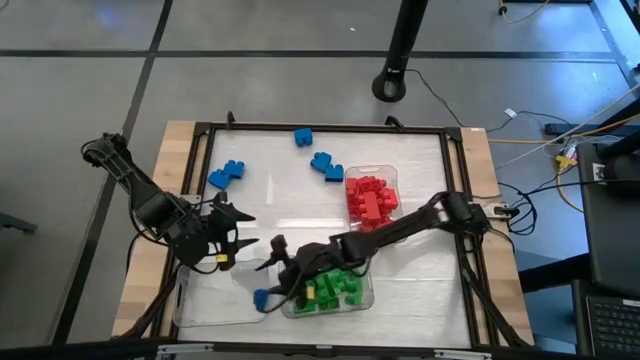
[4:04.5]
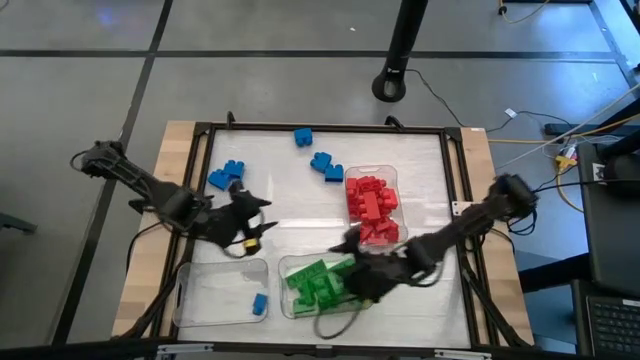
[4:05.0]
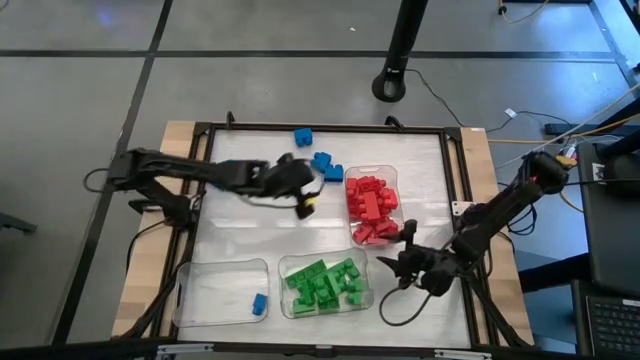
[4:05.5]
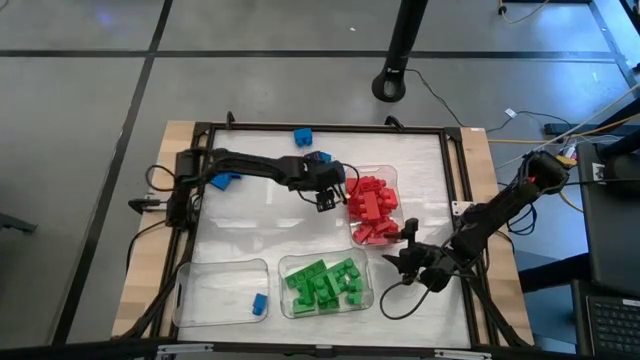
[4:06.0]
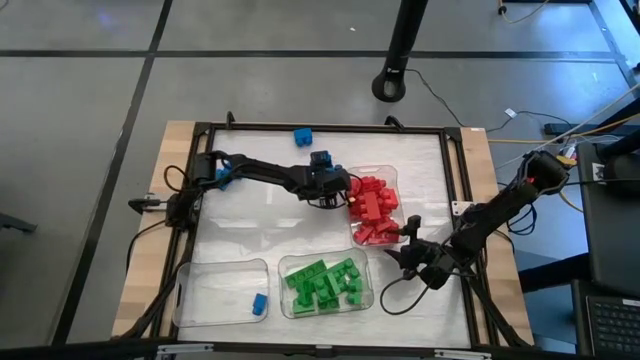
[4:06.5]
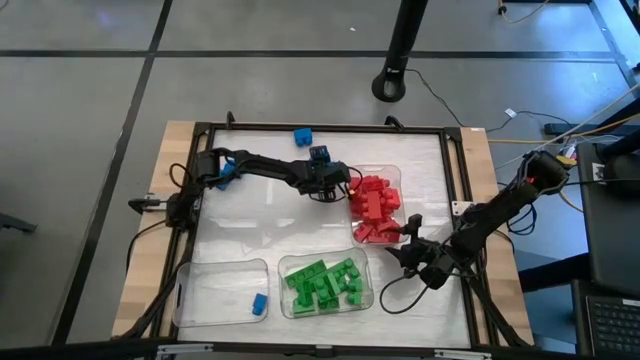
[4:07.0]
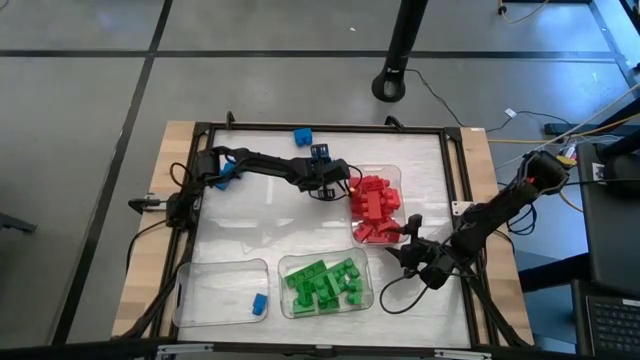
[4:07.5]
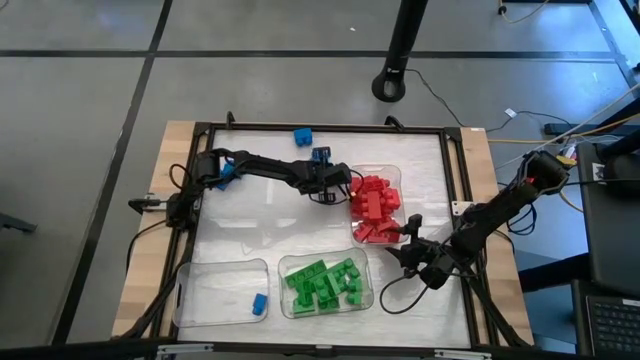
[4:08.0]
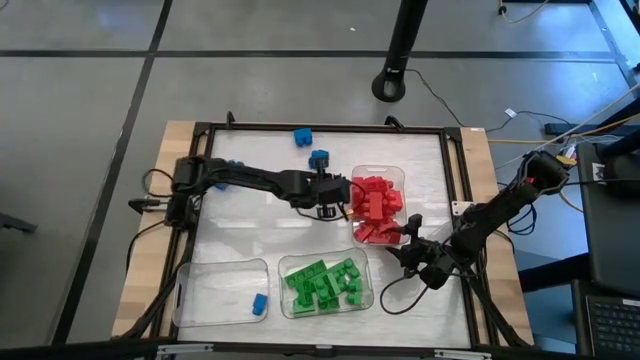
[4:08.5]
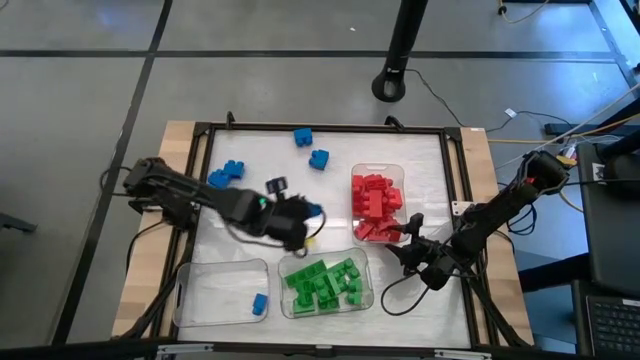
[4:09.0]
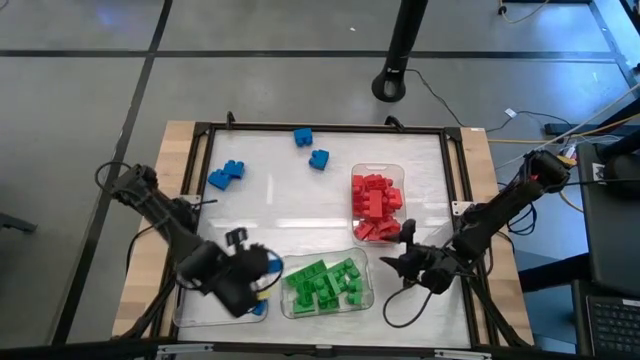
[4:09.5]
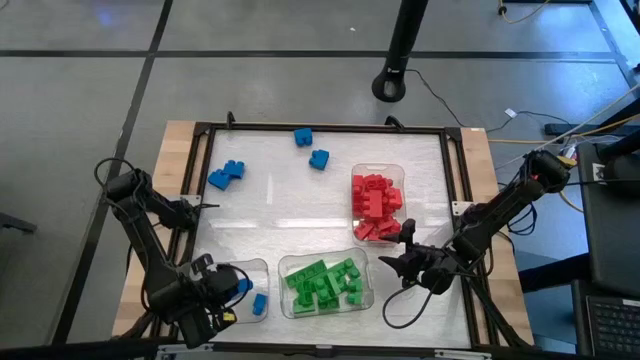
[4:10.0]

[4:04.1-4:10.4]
Task: Sort blocks
Put the blue game piece into the bottom left transparent bin

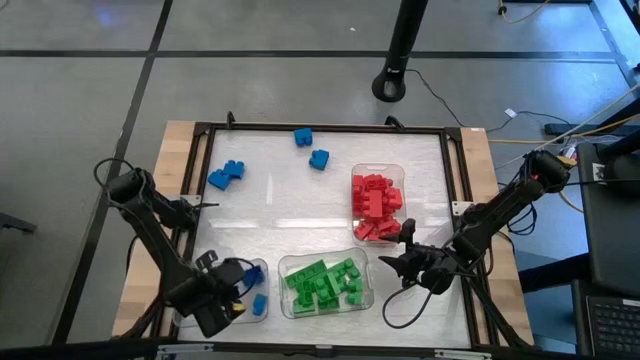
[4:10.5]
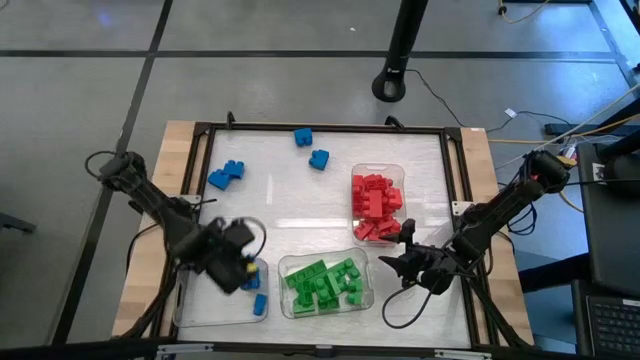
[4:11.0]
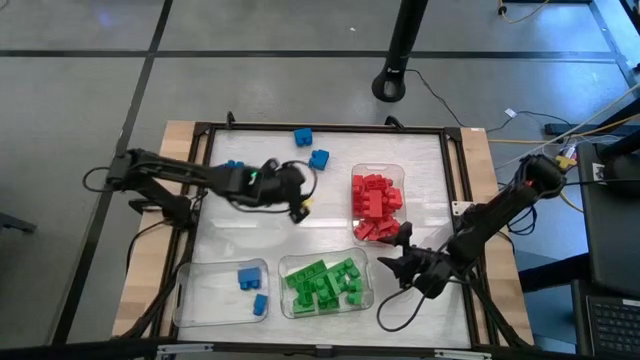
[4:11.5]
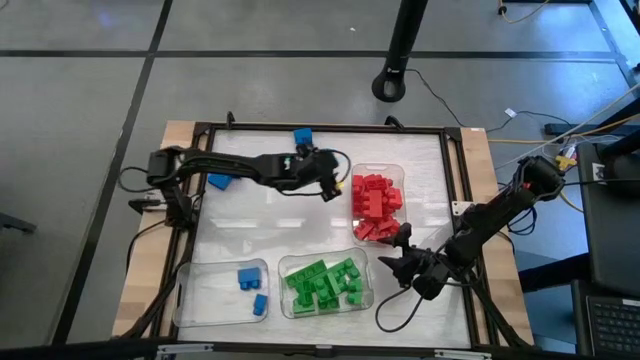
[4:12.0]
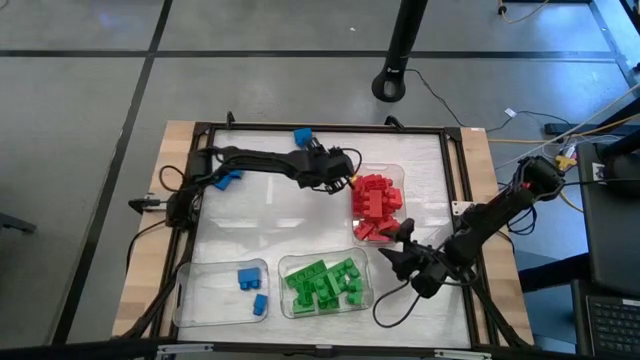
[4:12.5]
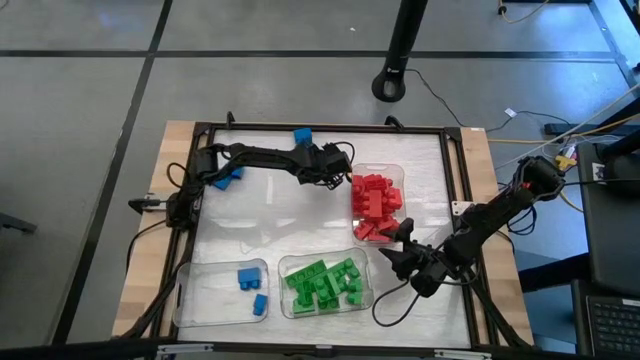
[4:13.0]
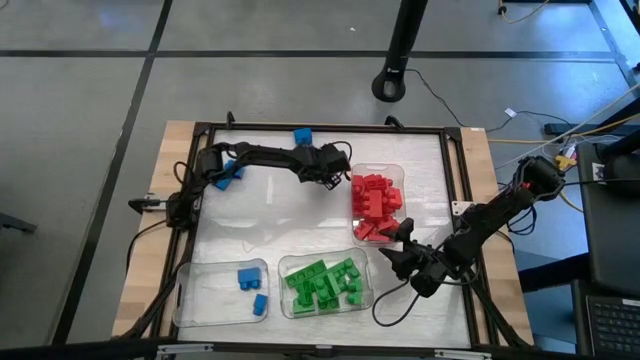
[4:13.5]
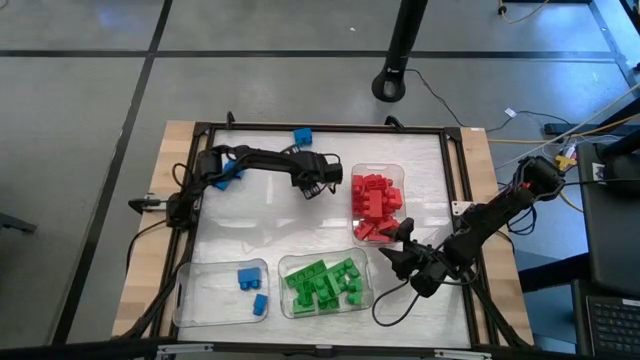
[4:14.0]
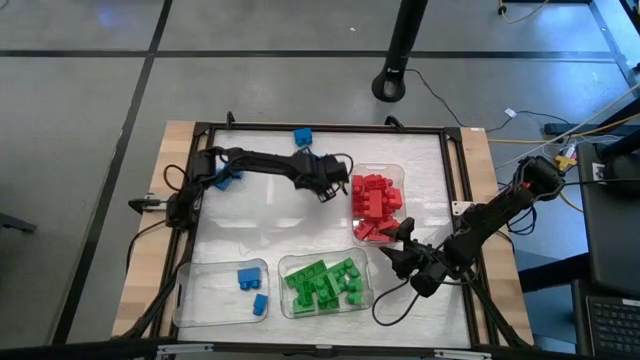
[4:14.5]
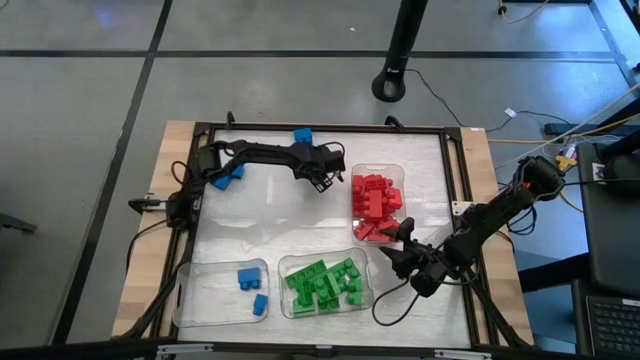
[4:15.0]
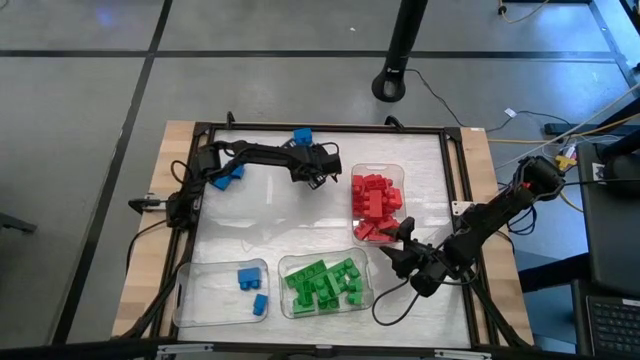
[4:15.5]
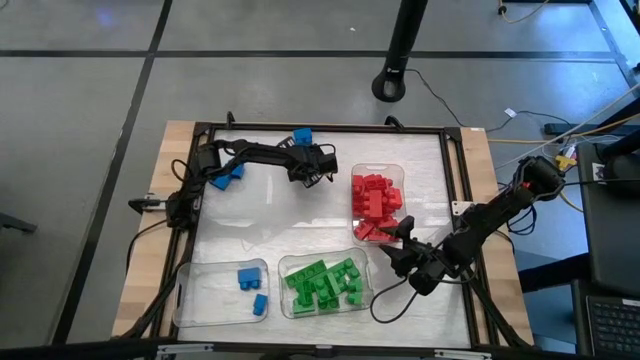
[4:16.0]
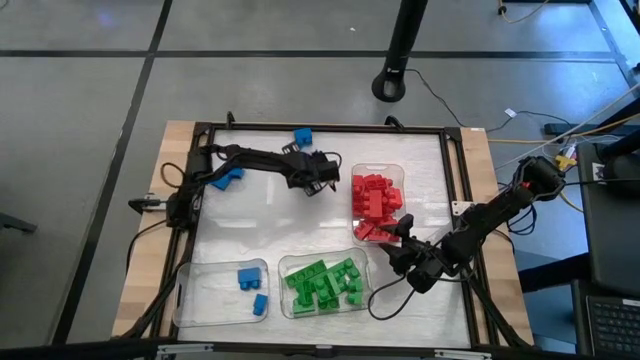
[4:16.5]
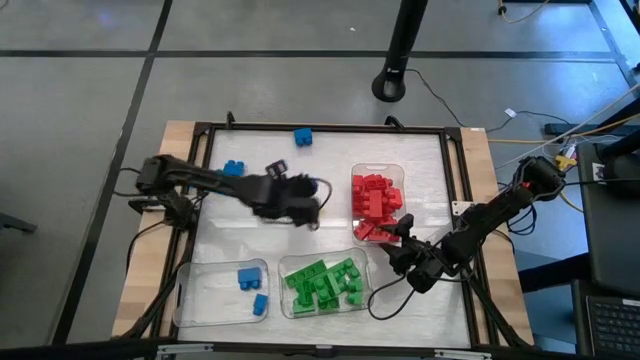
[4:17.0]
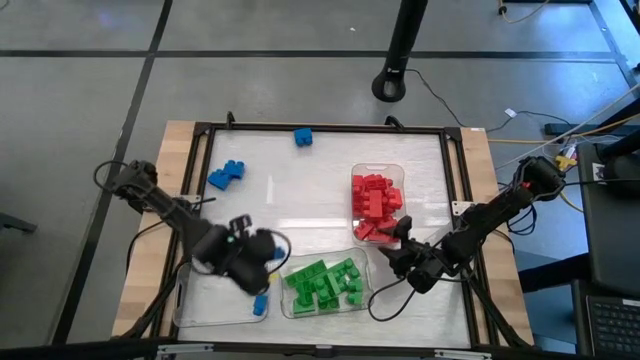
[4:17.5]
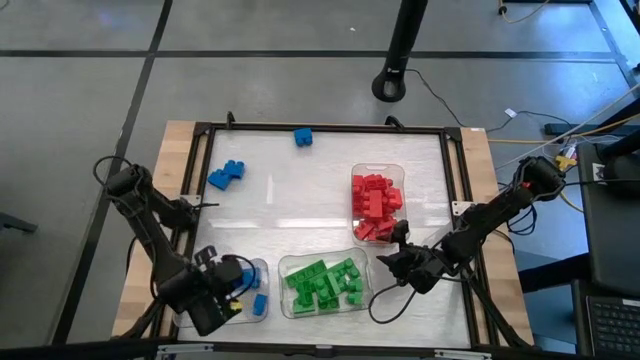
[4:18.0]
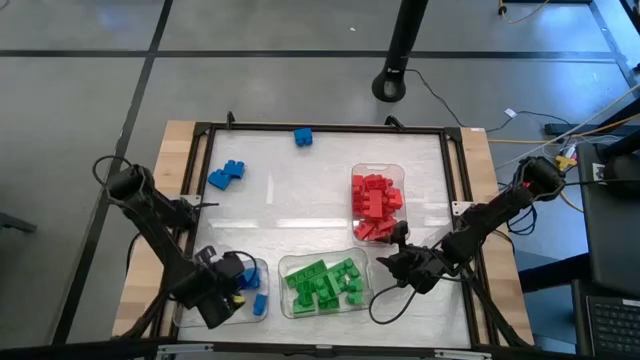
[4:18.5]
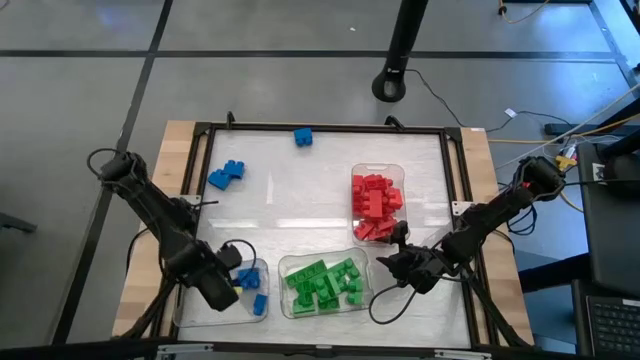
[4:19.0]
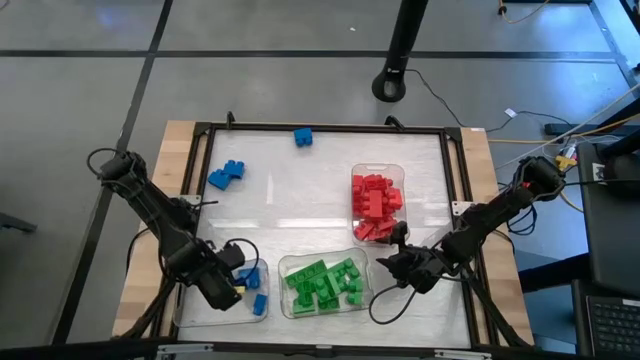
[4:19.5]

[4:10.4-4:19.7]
Put the blue game piece into the bottom left transparent bin

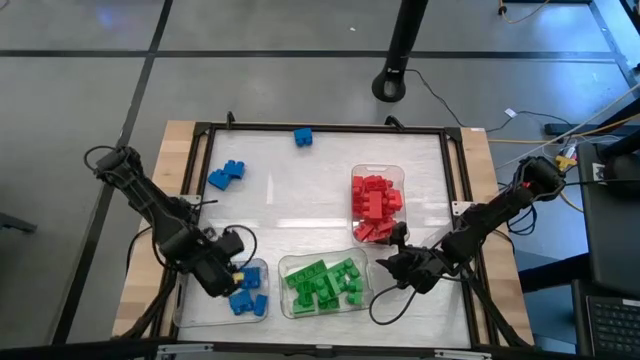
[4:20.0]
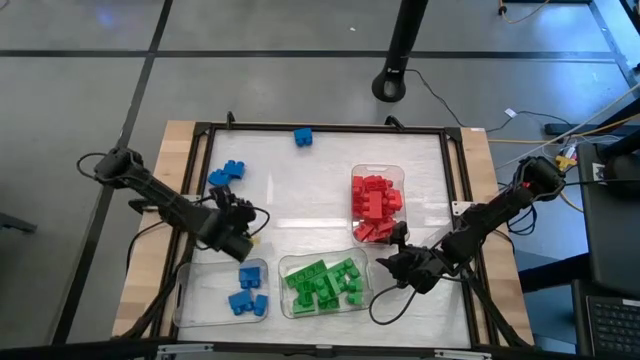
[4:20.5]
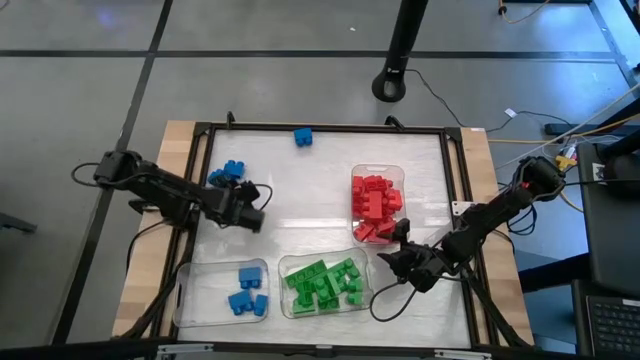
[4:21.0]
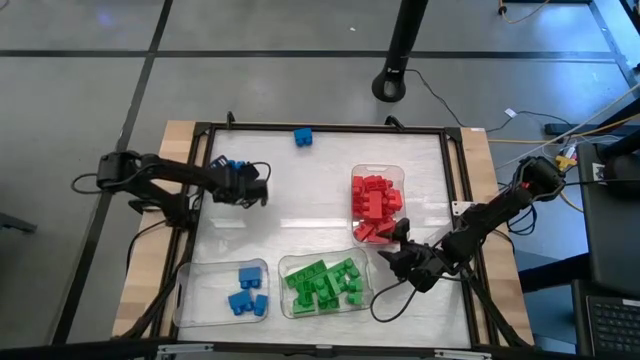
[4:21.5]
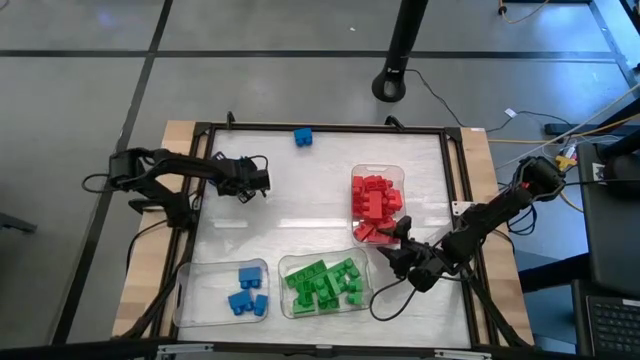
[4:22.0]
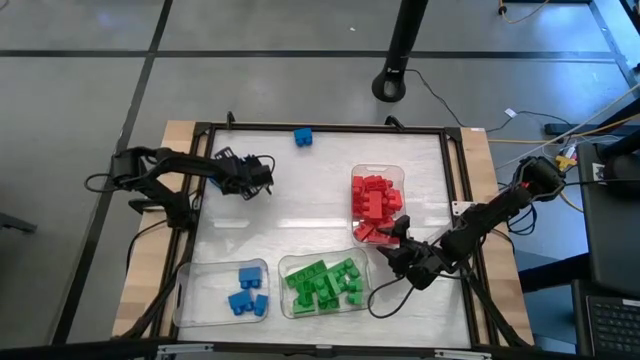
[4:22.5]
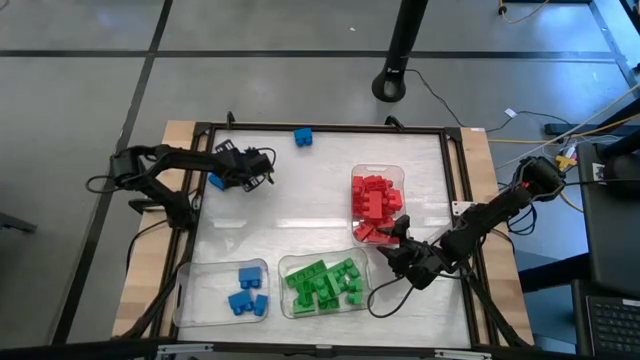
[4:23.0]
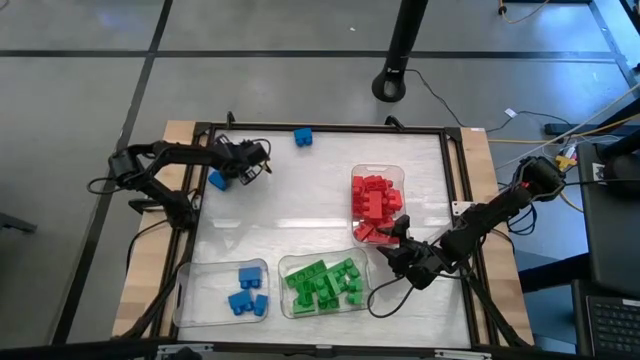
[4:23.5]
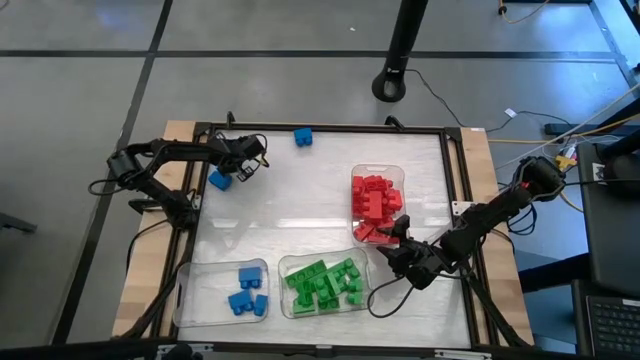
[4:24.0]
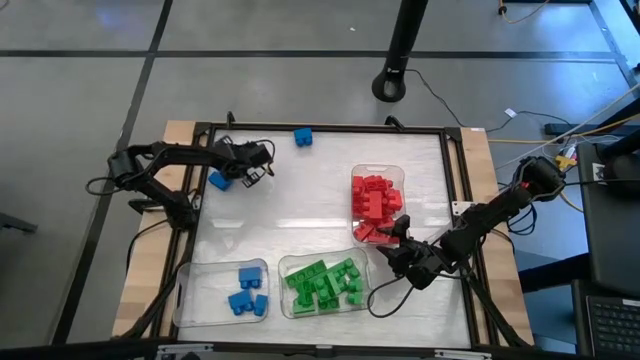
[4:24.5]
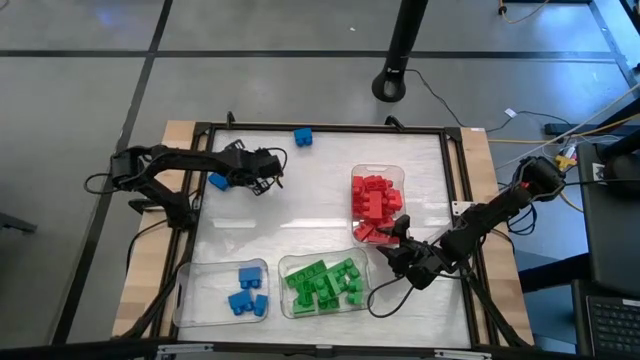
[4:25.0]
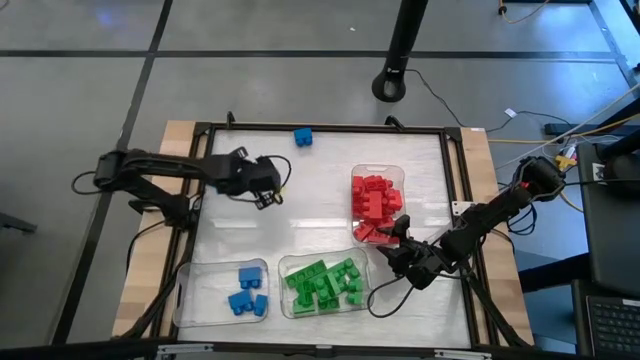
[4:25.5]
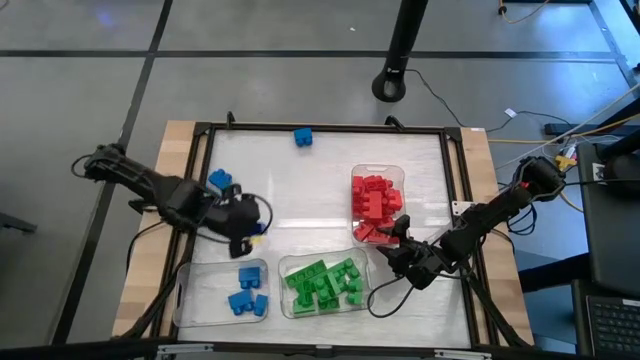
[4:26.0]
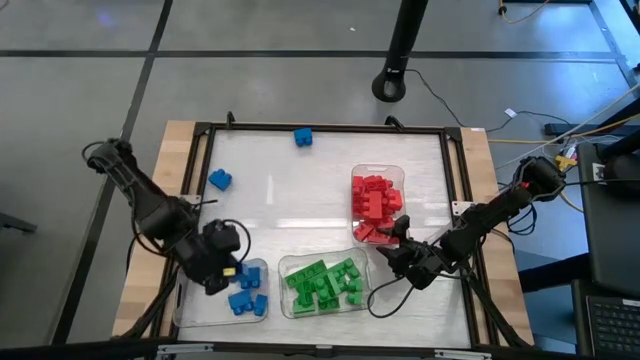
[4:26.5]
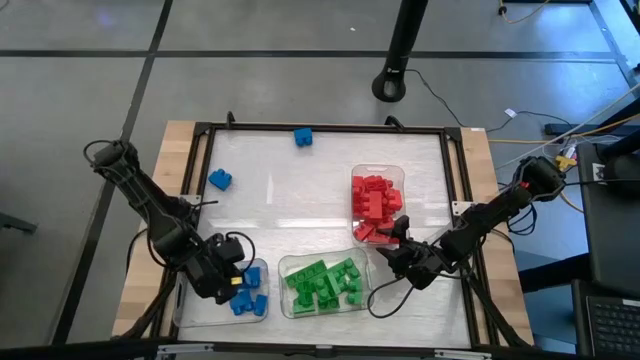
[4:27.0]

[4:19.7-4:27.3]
Put the blue game piece into the bottom left transparent bin
